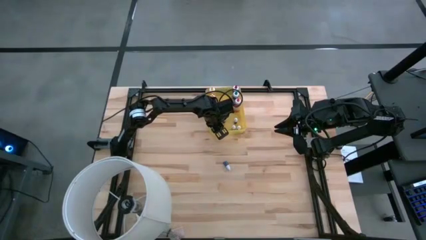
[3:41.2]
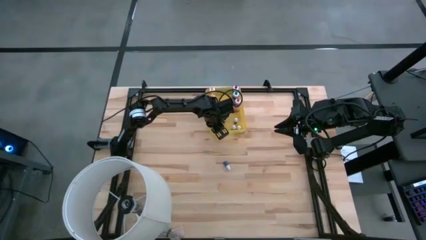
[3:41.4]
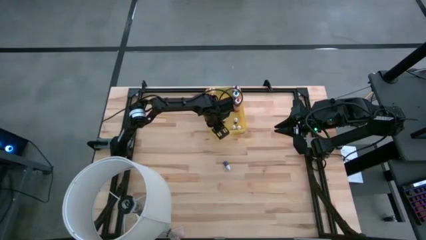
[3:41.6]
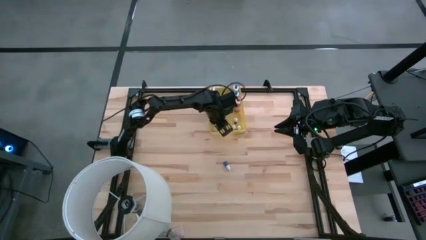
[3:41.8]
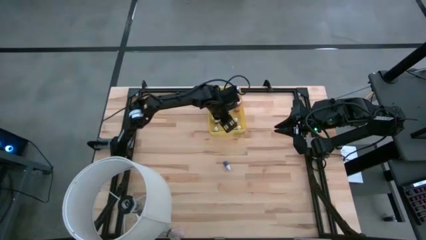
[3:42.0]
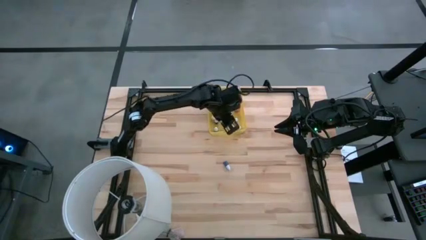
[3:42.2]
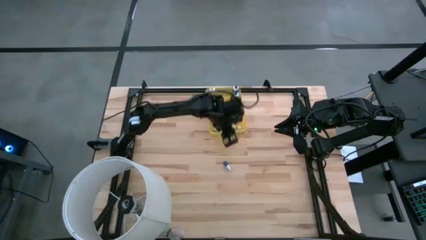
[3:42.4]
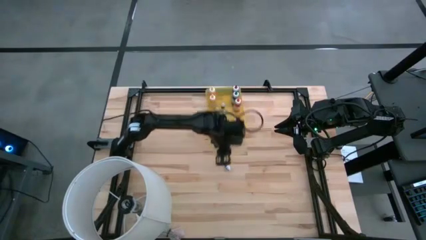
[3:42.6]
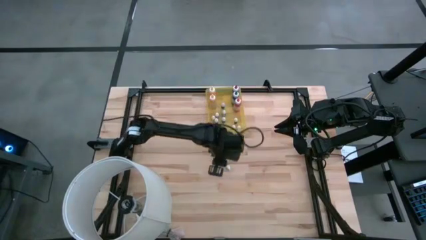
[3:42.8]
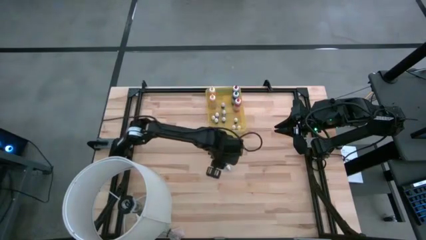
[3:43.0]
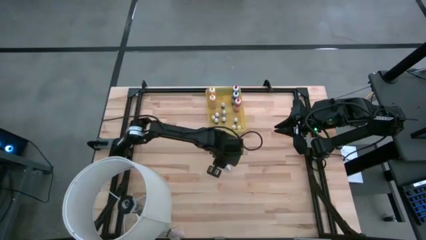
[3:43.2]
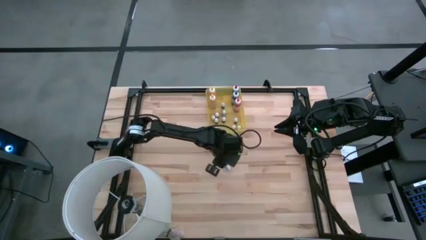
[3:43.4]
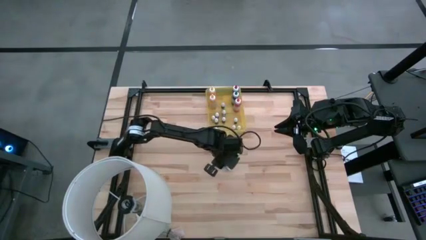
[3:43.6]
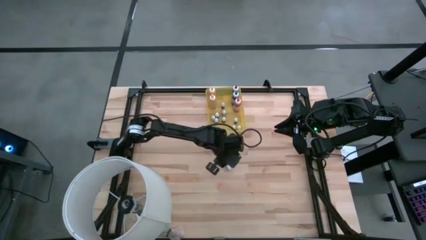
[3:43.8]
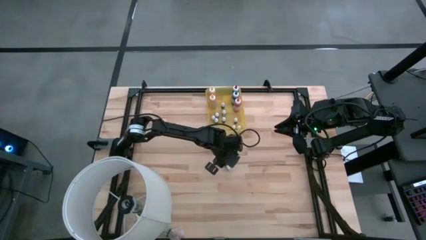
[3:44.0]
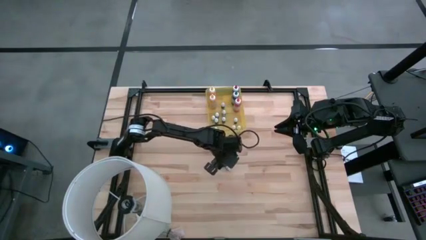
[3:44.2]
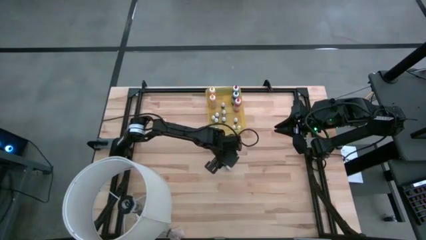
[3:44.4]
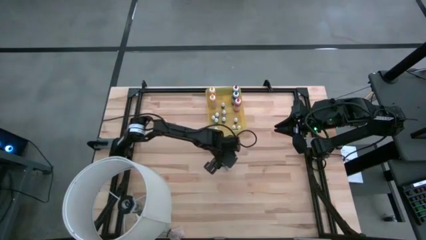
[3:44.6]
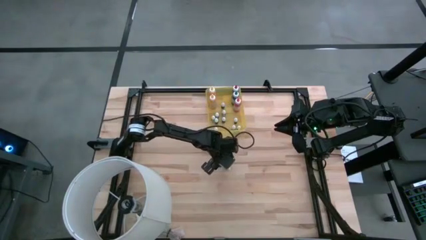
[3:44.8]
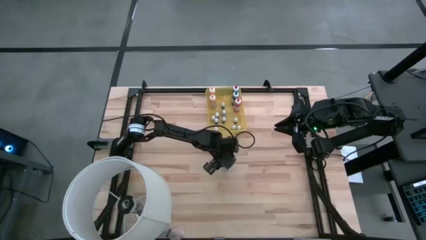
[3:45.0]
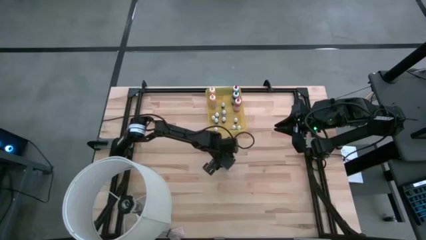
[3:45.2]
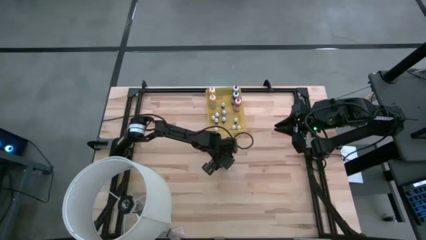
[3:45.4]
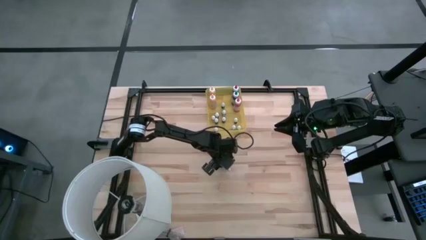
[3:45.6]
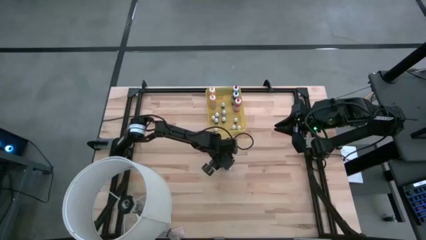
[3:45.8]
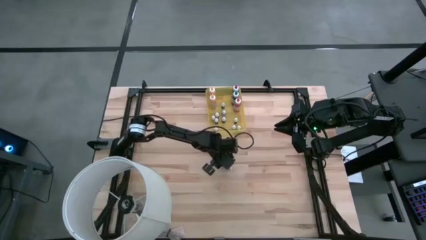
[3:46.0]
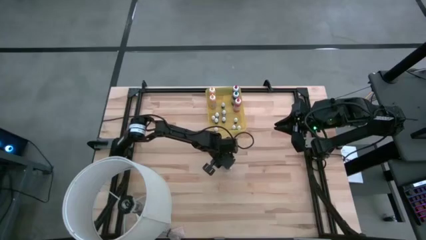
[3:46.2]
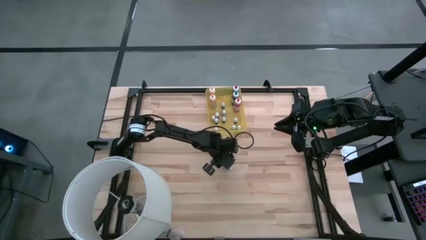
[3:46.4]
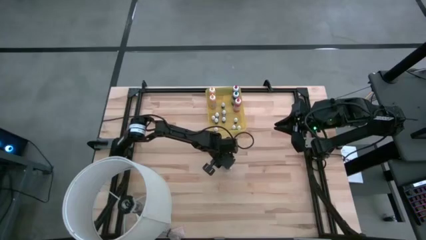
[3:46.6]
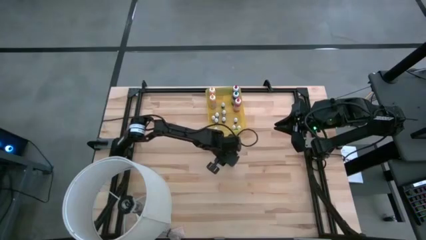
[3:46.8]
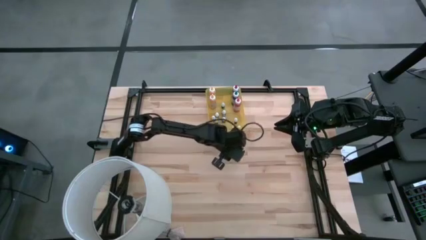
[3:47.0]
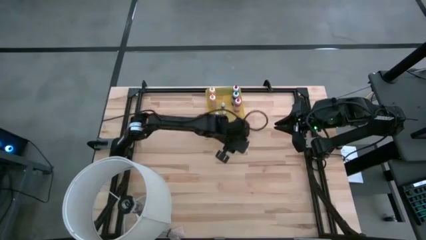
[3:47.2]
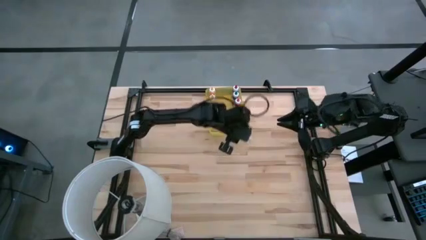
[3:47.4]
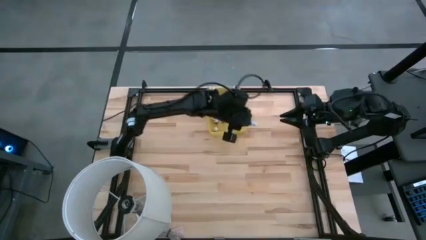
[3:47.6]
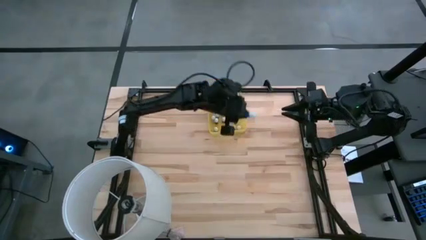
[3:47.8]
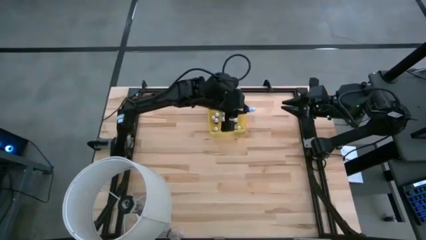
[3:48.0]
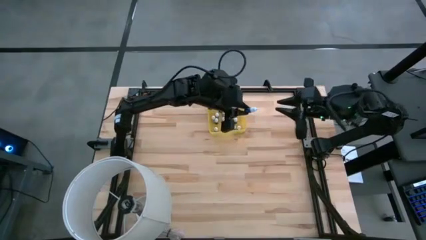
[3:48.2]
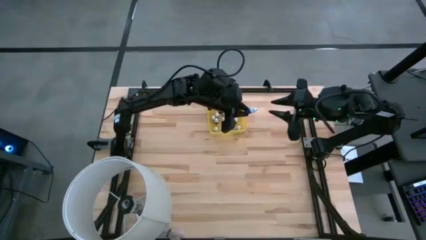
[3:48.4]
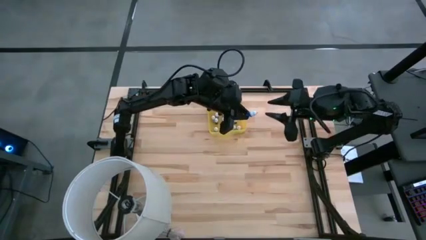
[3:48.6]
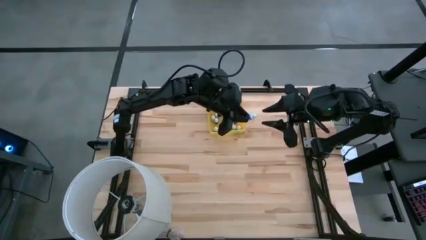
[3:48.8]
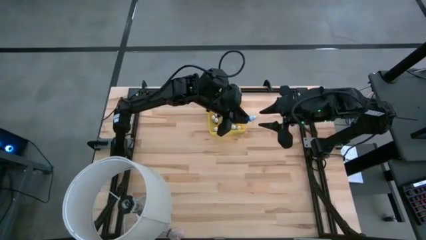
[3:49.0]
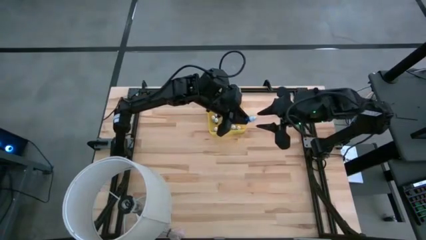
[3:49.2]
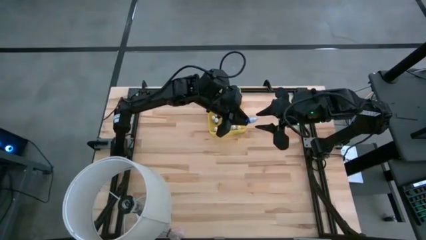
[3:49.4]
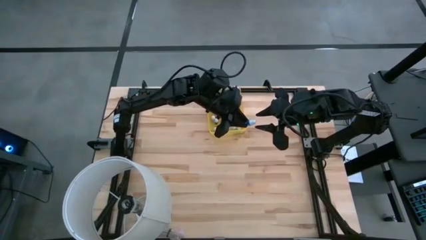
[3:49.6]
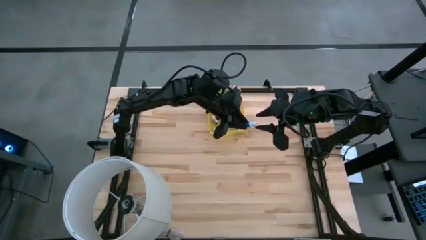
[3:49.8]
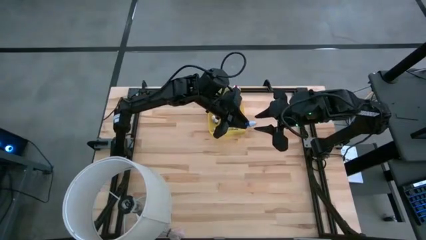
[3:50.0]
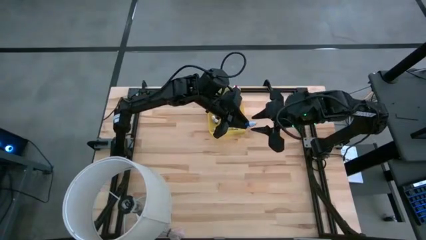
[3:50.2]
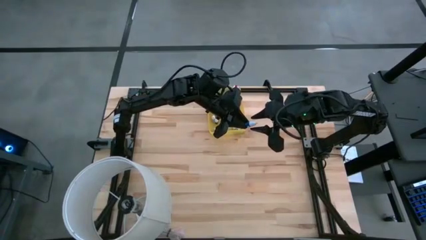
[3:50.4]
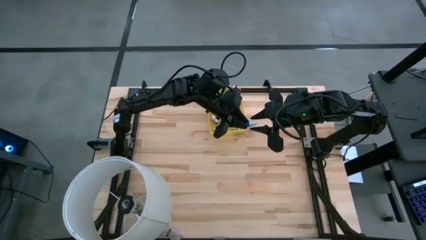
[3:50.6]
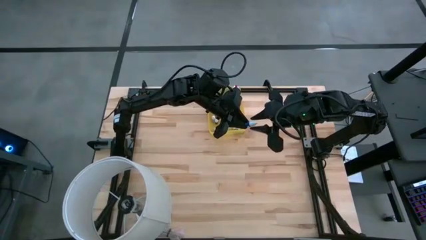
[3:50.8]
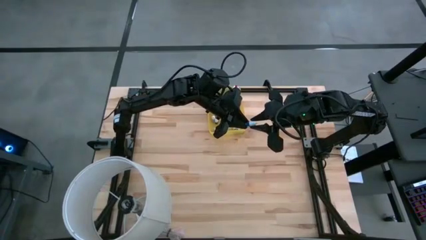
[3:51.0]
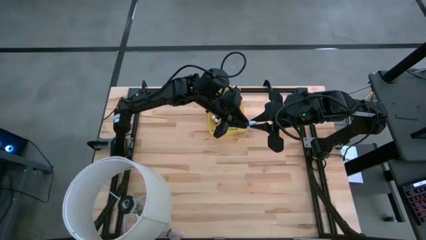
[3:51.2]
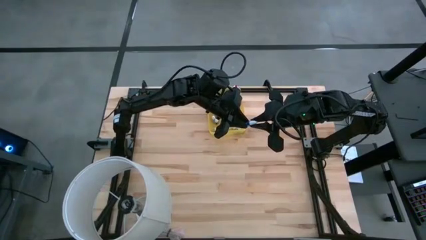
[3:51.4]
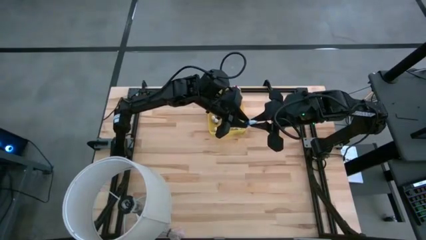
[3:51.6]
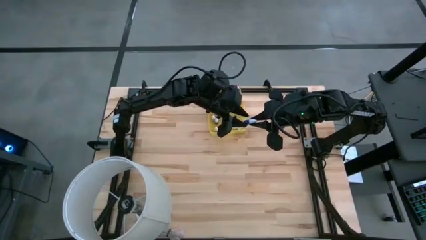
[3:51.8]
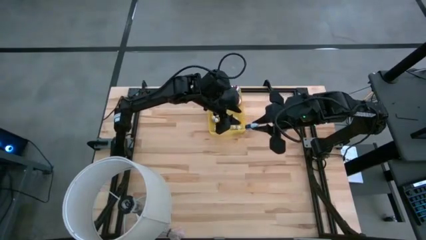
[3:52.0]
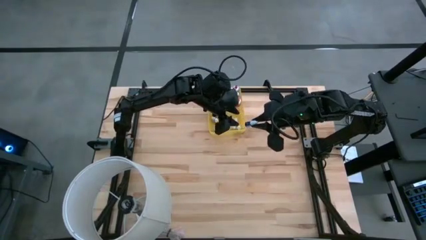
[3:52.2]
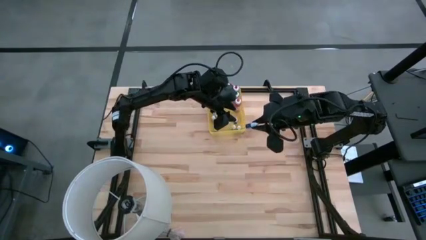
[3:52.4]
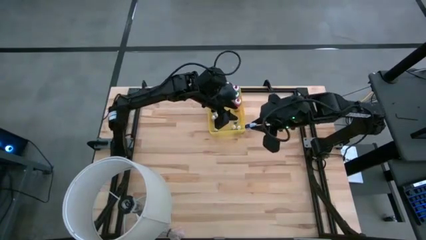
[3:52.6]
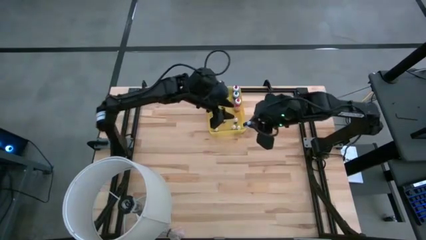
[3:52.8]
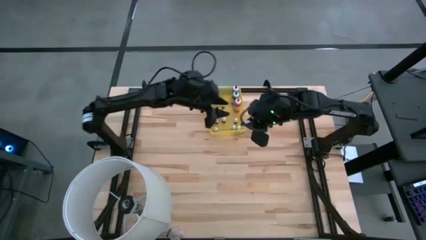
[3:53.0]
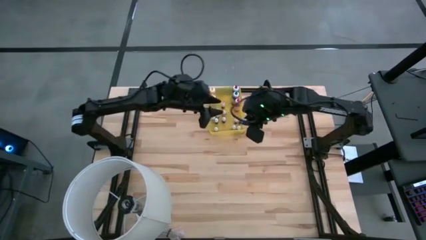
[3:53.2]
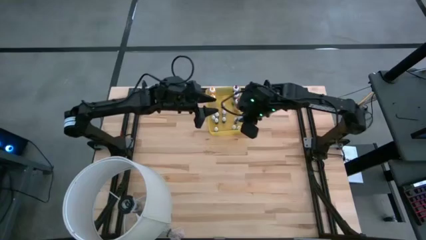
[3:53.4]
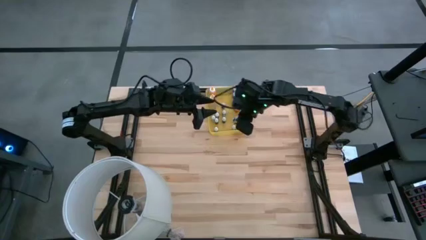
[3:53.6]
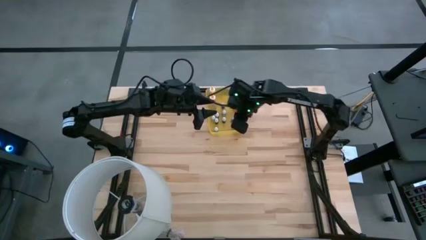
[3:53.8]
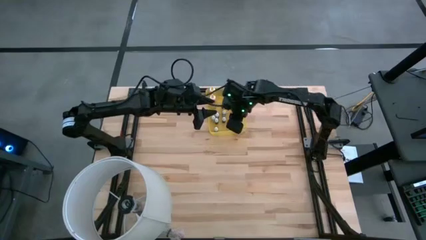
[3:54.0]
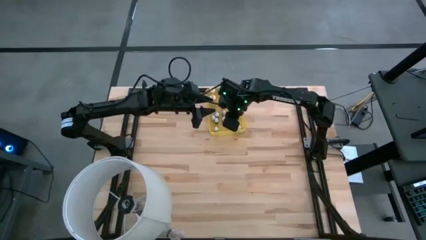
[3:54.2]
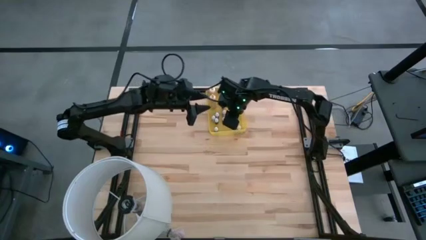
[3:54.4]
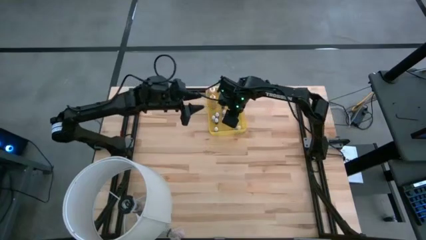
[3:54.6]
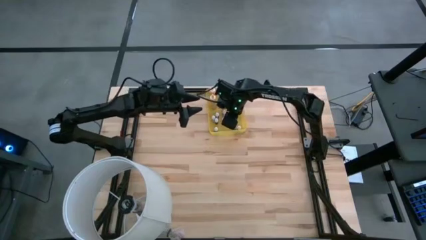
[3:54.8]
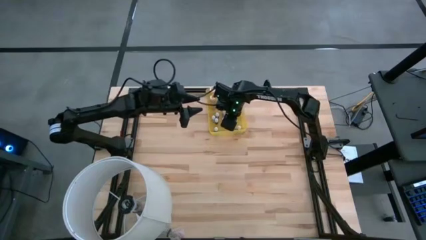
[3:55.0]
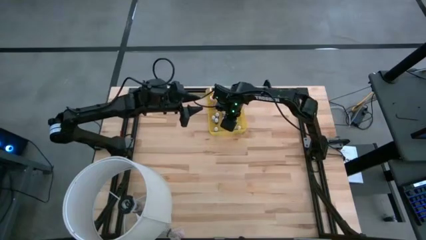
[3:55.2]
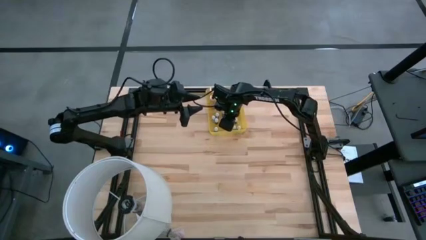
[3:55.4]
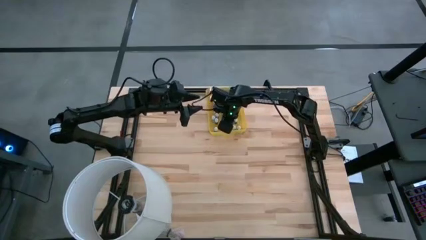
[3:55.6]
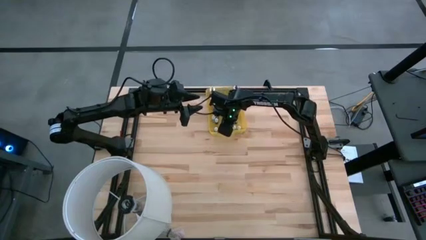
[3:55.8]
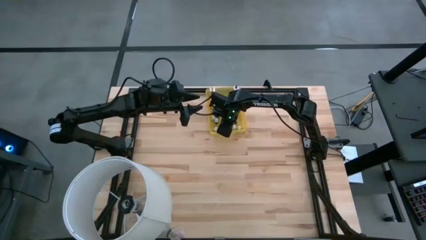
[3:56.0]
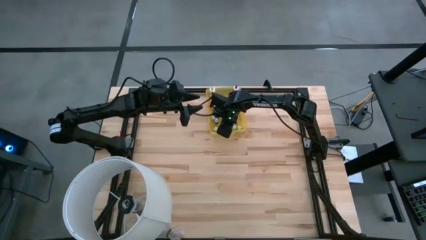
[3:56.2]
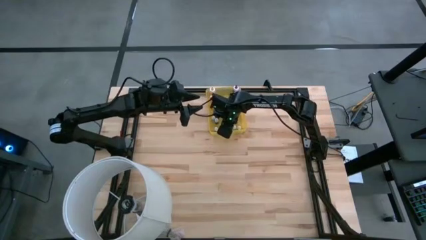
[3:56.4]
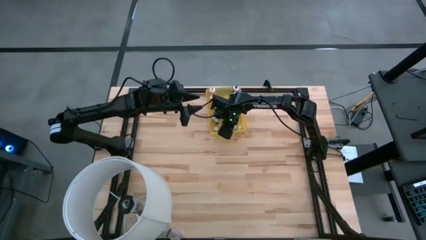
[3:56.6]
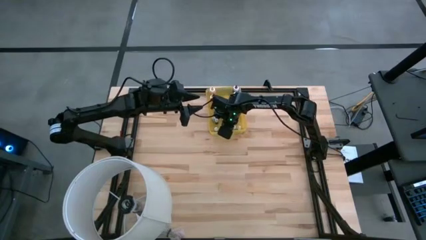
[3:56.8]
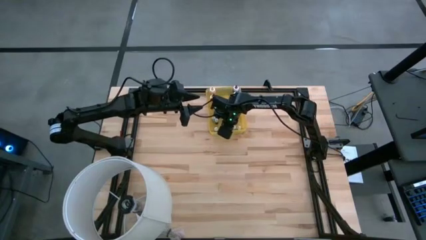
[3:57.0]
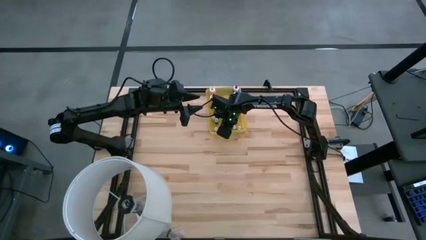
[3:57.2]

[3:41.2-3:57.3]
Task: Pick & Place food coloring
Put the small dark blue food coloring bottle into the yellow bin
